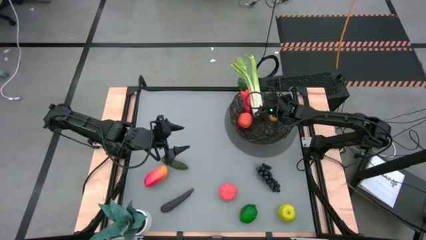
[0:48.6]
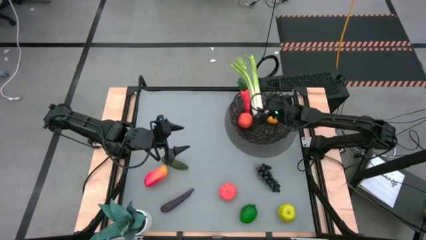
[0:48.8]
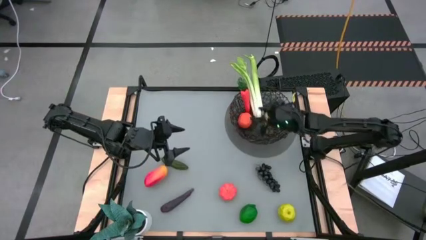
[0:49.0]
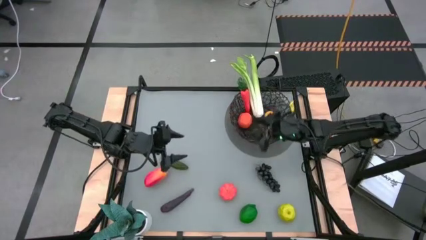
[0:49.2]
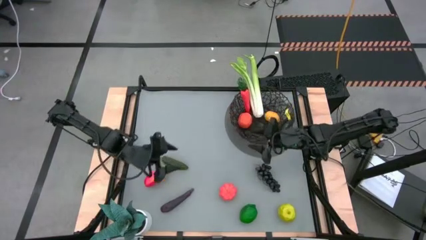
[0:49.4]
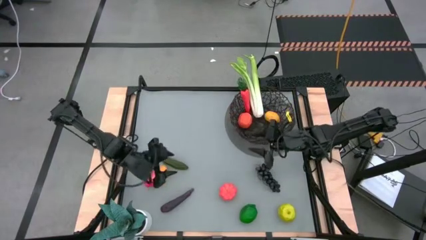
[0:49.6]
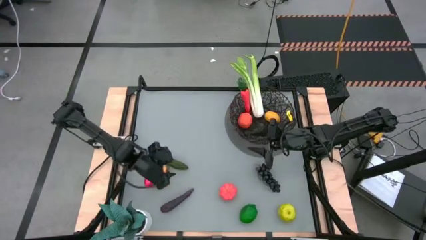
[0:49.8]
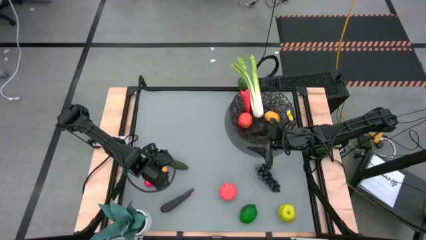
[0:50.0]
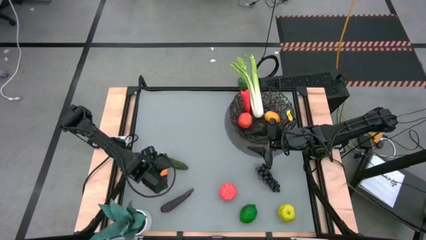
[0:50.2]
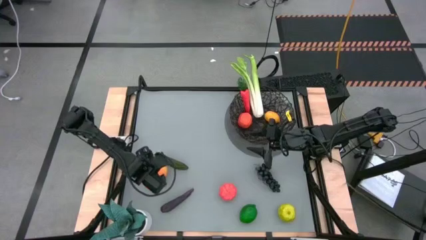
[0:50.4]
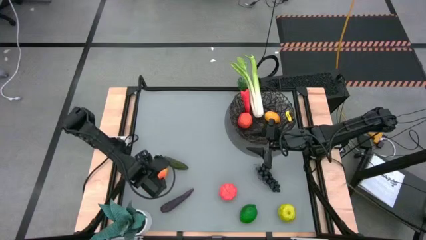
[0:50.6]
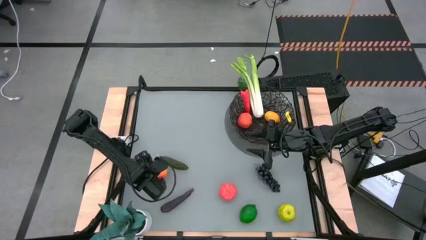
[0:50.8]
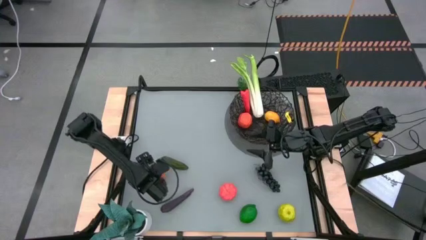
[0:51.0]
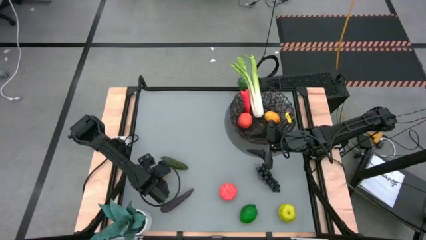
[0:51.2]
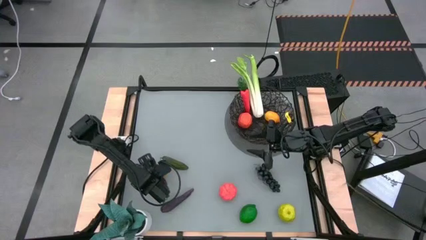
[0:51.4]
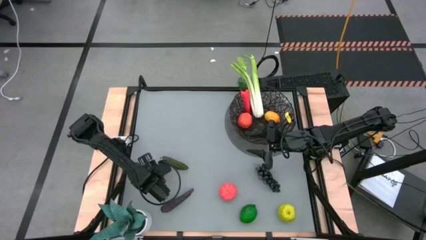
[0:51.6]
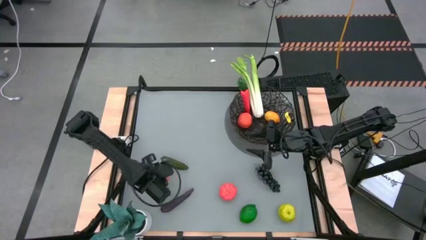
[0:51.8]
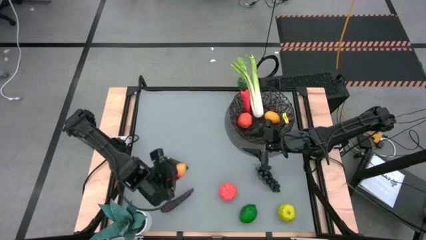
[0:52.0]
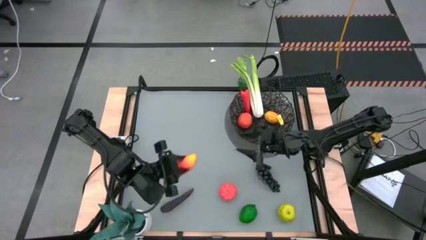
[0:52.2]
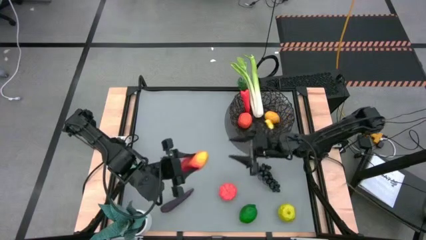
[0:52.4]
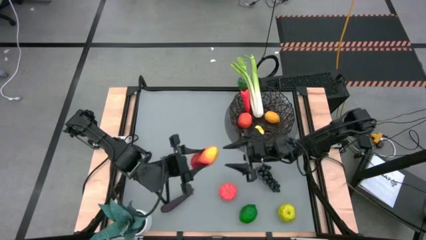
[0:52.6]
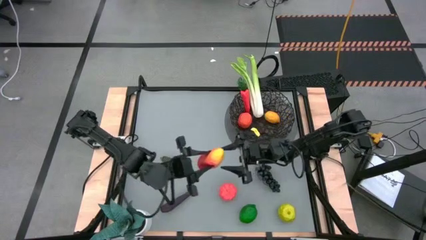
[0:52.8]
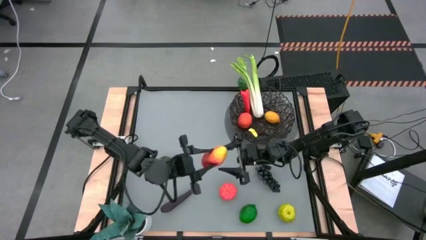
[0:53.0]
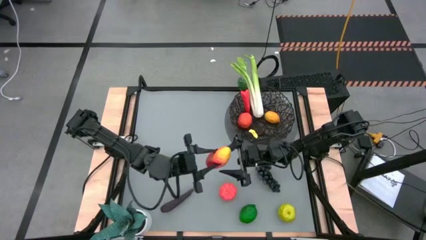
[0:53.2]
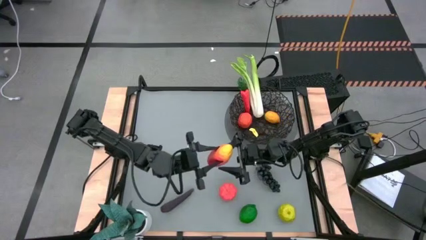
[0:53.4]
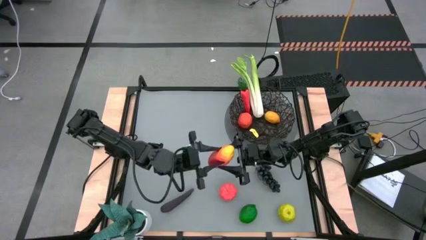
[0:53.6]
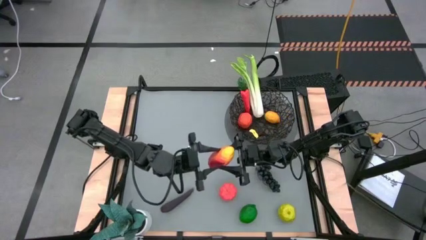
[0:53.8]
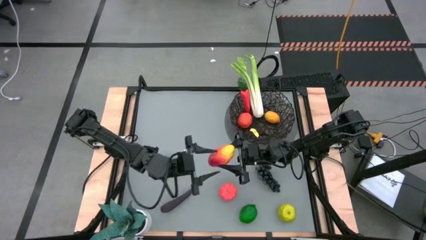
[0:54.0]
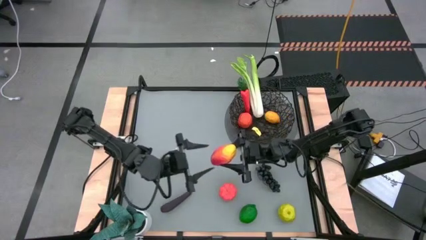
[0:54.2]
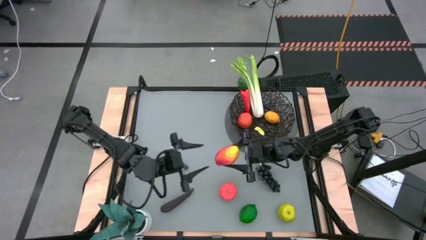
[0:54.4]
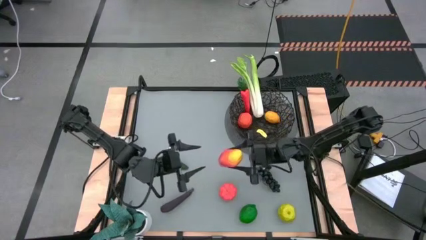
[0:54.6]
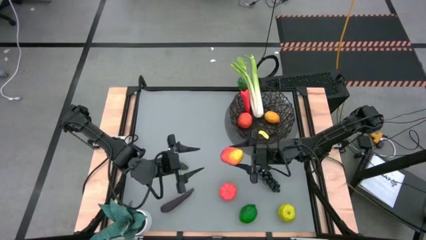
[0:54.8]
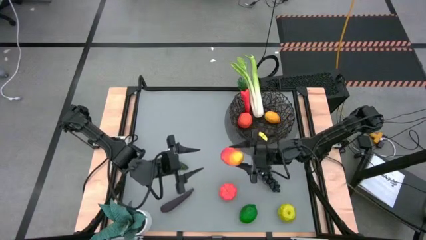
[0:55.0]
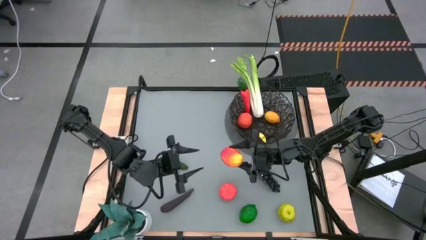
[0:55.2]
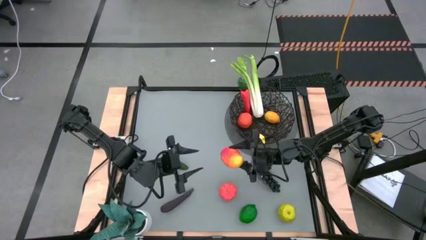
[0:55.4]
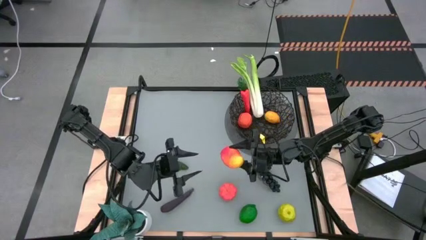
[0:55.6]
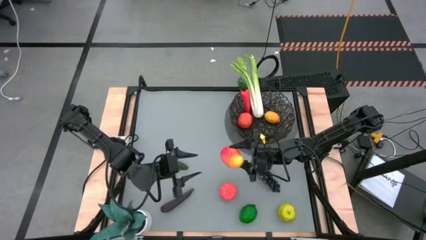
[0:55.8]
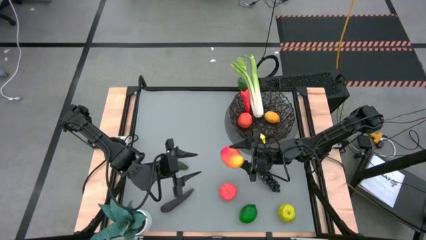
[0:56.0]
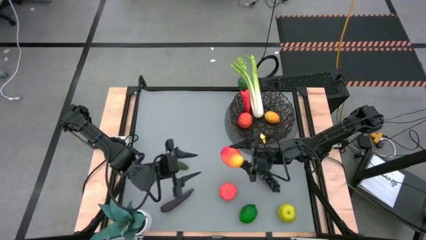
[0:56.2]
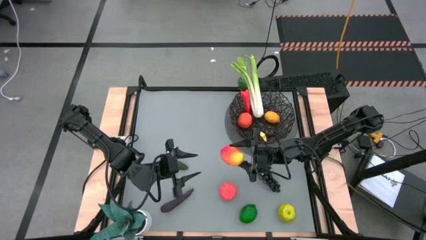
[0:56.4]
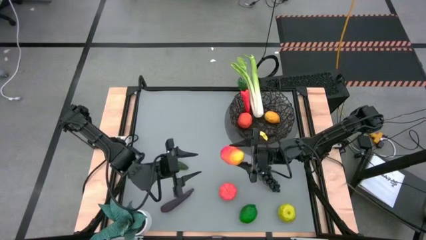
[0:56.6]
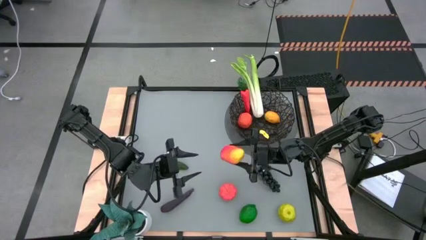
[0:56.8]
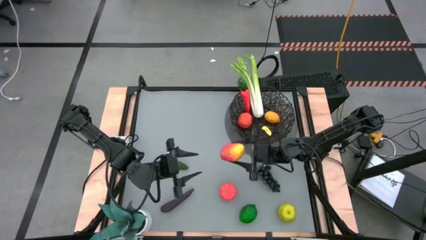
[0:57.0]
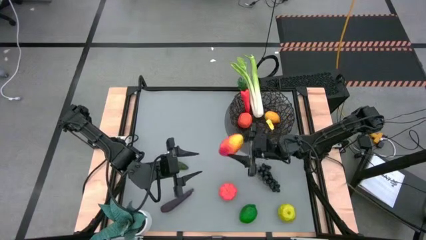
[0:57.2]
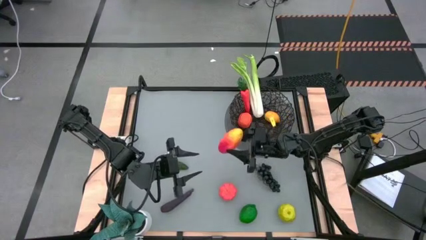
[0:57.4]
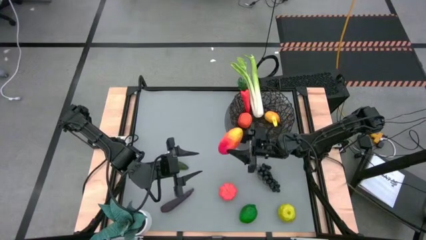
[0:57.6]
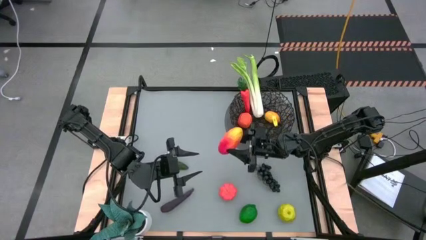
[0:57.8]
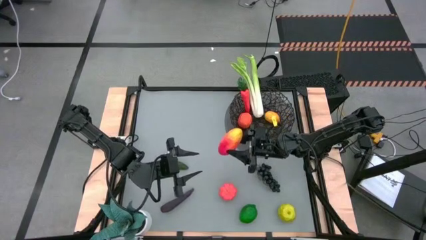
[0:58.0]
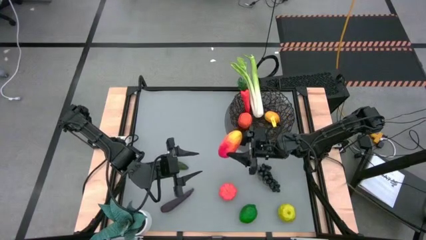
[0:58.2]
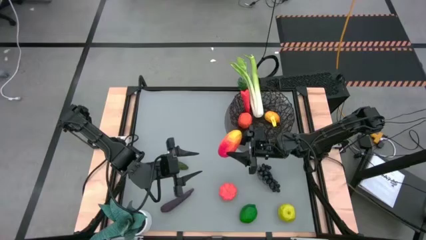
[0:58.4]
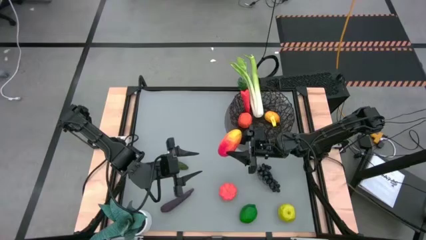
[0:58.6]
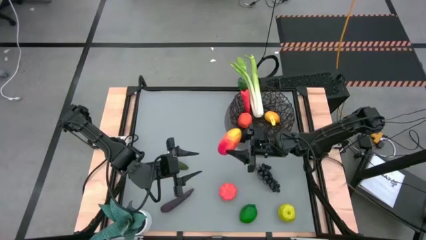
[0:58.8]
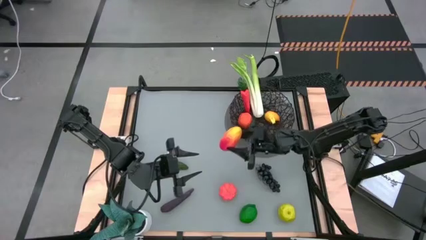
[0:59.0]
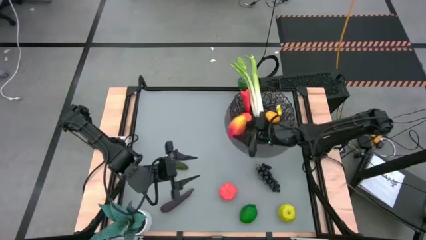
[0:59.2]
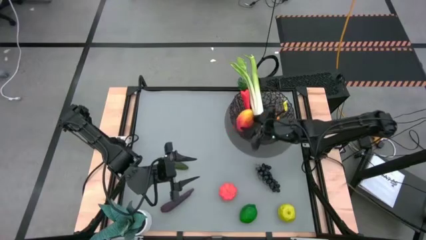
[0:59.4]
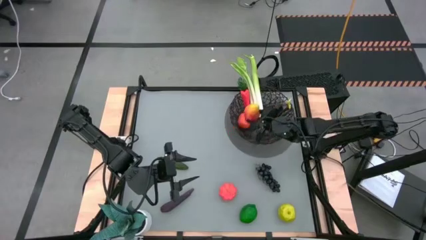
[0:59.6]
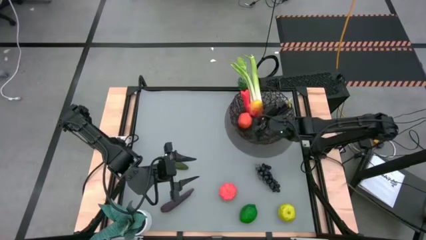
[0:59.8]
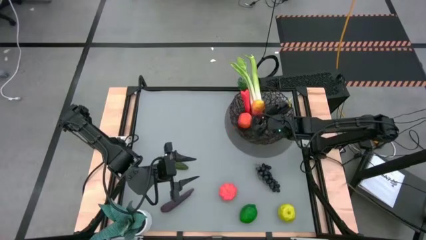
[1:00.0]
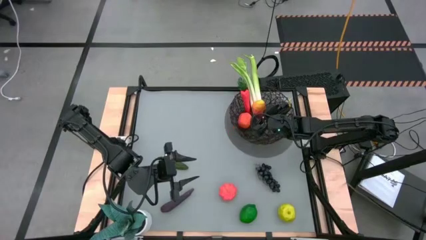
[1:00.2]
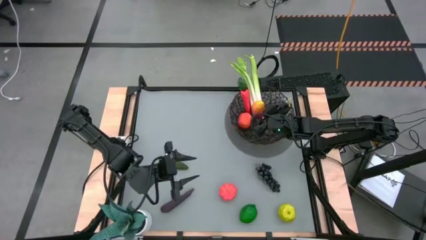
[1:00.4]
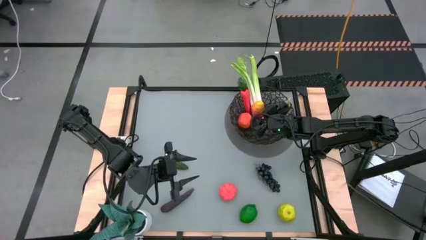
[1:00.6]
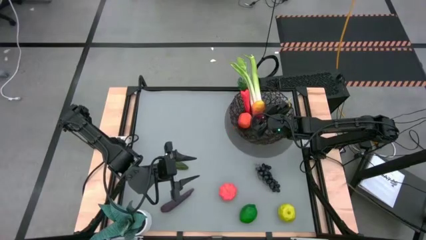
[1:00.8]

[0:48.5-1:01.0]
Task: Build produce basket
Put the mango into the black wire basket

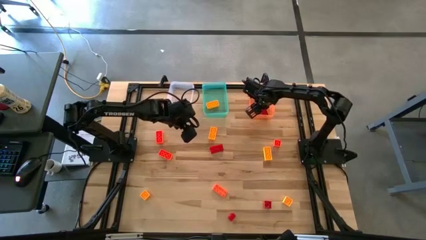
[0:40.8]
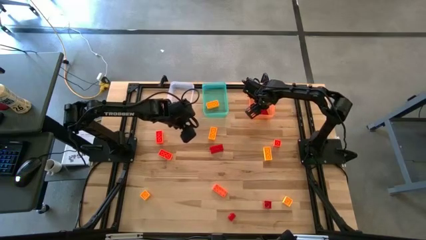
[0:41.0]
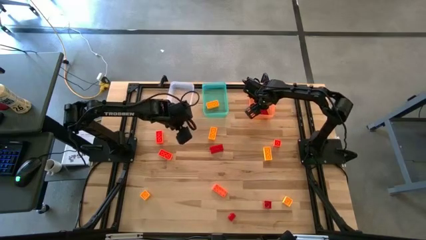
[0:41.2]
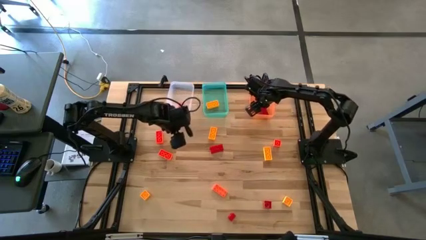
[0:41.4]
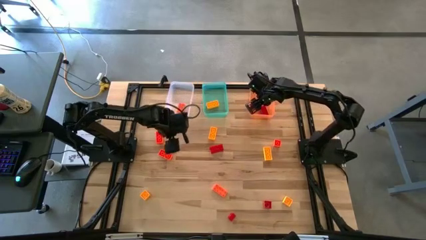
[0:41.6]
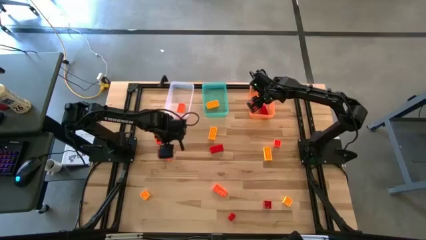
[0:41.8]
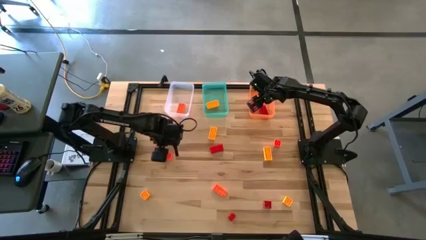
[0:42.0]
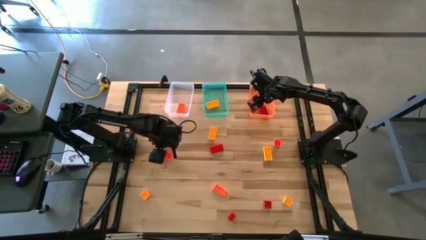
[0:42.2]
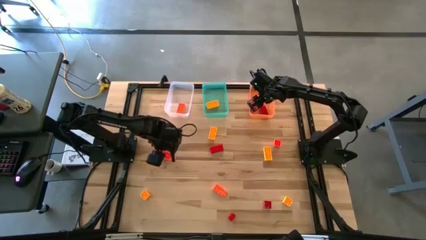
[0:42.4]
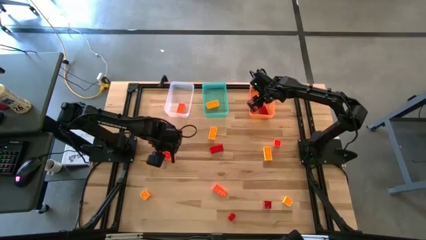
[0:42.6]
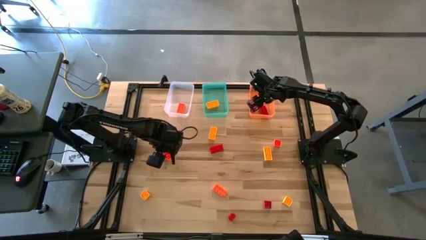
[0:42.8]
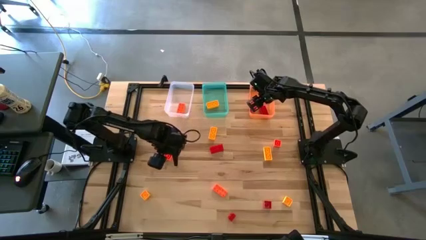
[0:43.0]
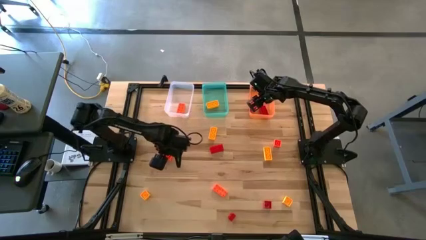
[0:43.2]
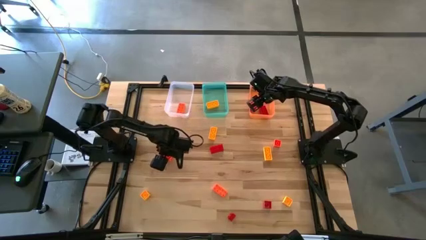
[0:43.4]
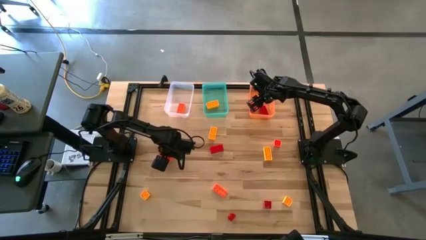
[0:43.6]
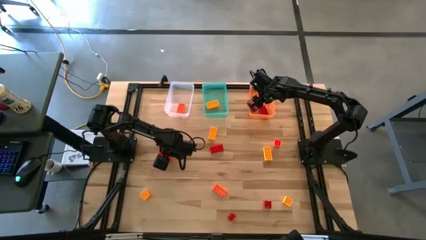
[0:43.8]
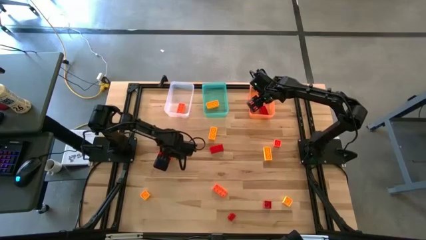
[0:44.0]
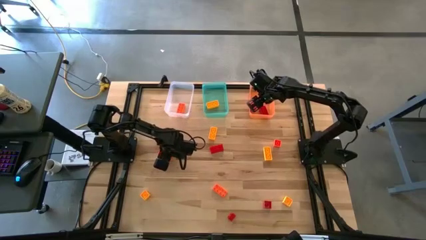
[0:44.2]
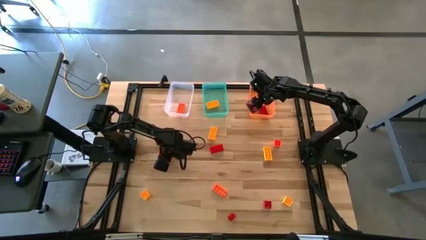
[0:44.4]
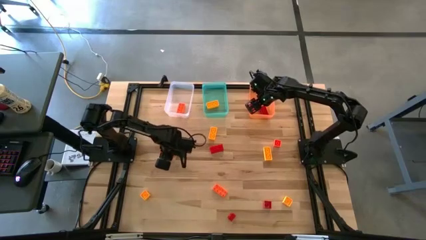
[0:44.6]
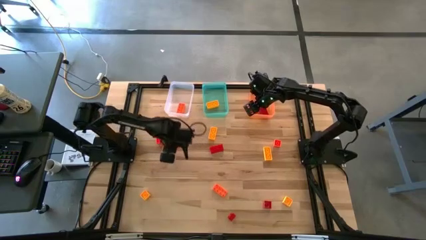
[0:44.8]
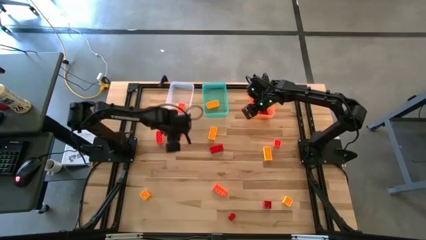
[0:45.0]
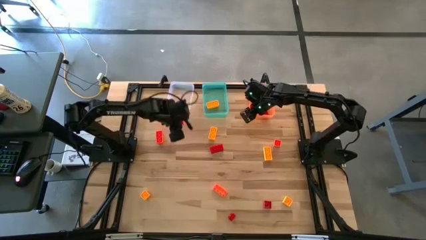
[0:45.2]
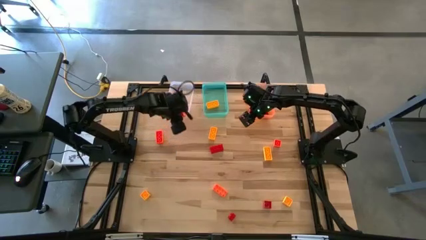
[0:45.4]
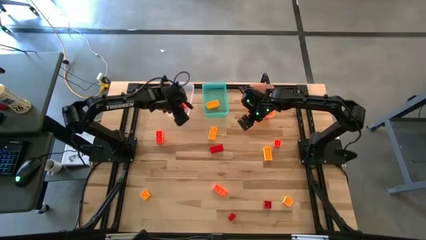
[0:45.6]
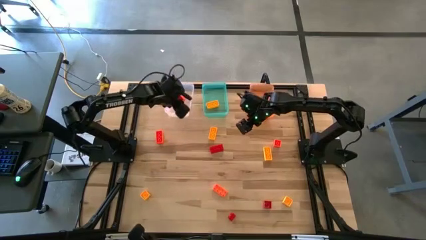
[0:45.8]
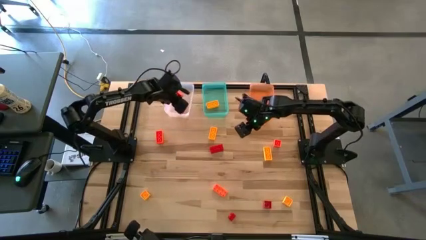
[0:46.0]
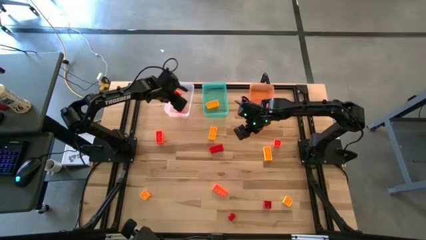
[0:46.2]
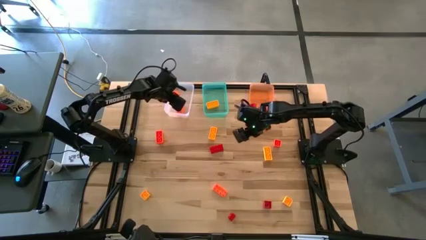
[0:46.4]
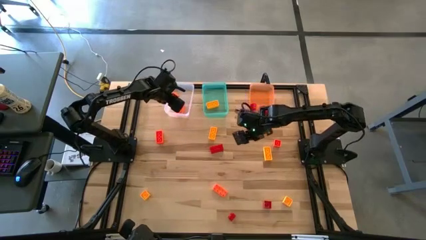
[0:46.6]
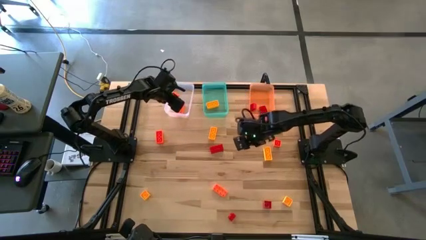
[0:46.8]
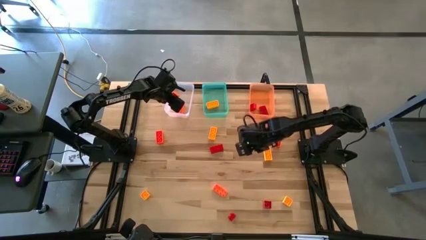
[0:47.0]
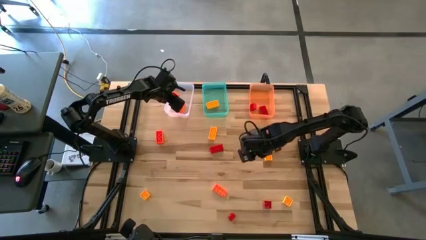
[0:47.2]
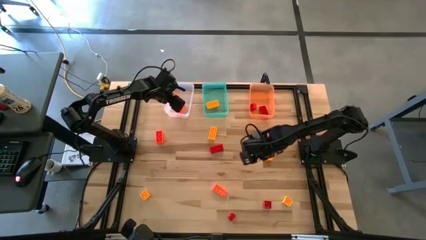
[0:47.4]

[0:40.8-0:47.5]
Task: Sort & place blocks by color
Put the orange game piece into the transparent bin
